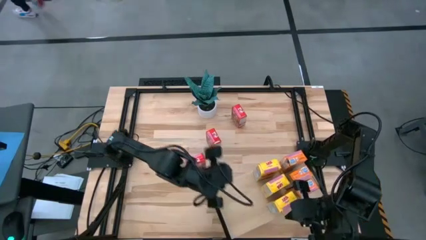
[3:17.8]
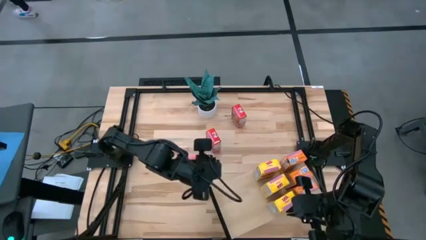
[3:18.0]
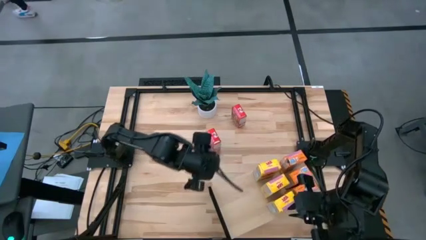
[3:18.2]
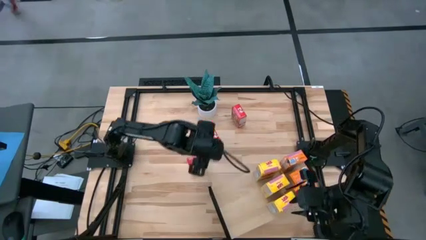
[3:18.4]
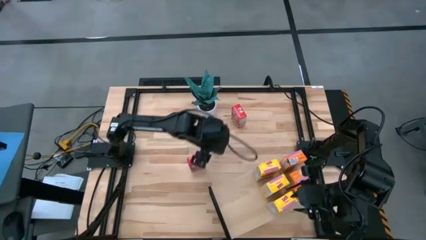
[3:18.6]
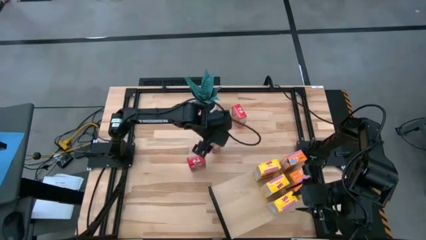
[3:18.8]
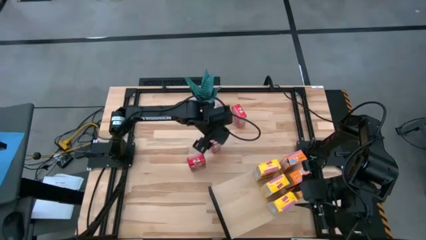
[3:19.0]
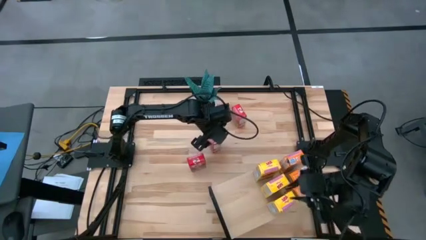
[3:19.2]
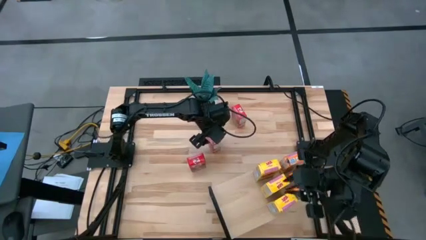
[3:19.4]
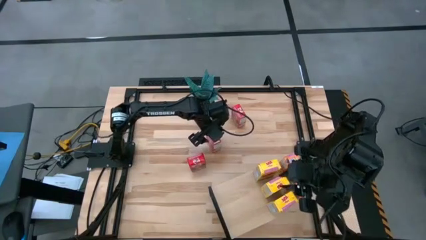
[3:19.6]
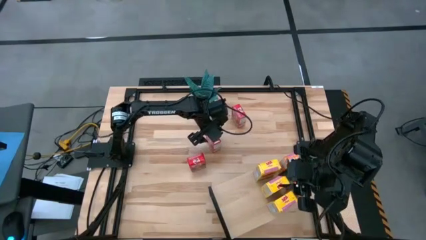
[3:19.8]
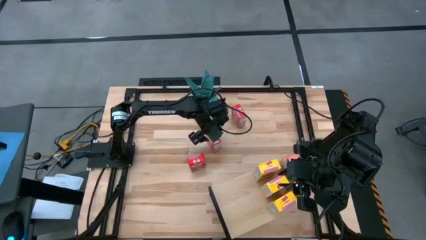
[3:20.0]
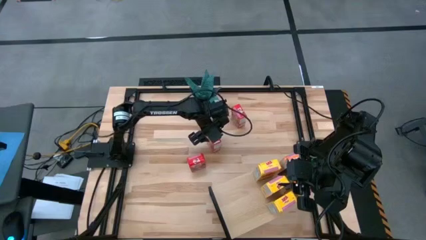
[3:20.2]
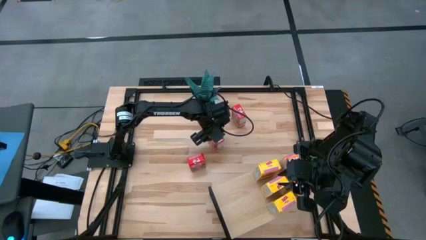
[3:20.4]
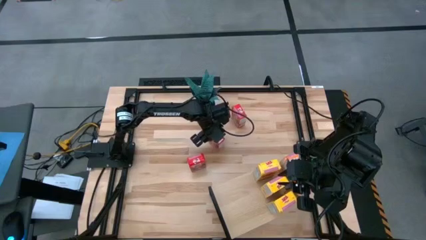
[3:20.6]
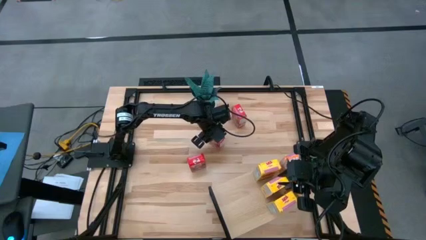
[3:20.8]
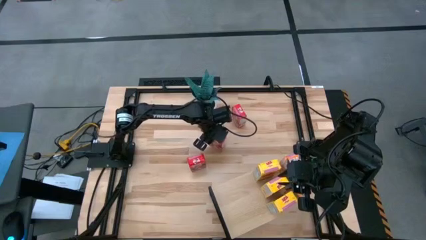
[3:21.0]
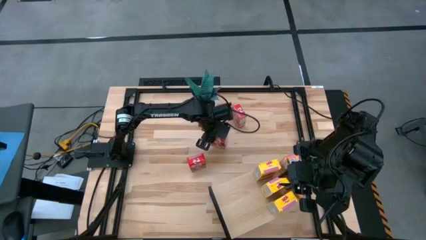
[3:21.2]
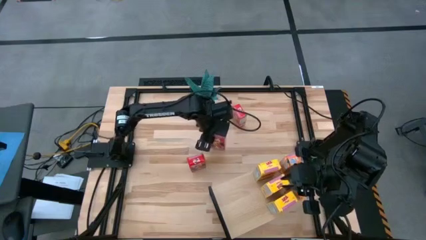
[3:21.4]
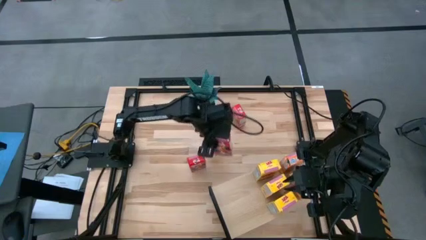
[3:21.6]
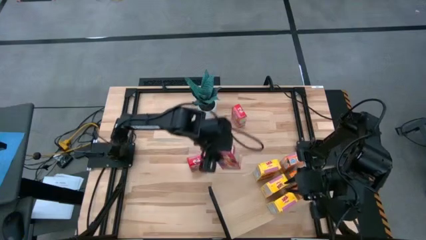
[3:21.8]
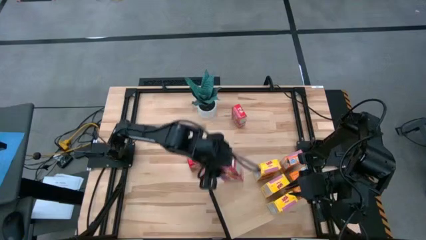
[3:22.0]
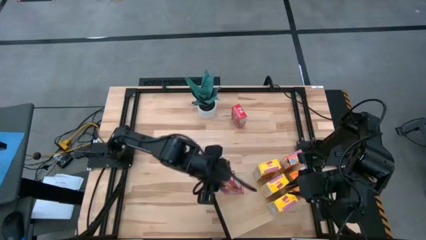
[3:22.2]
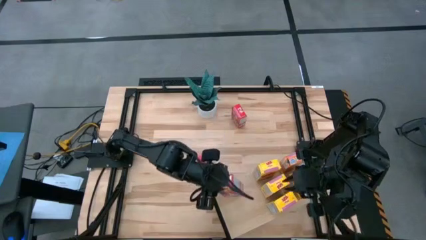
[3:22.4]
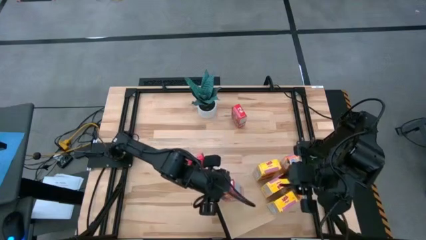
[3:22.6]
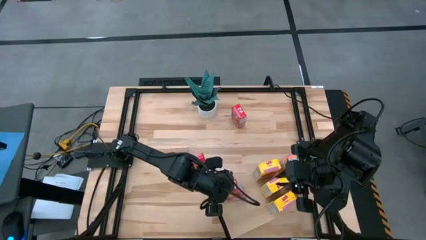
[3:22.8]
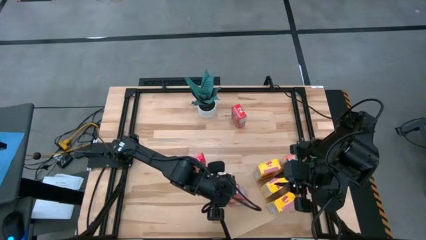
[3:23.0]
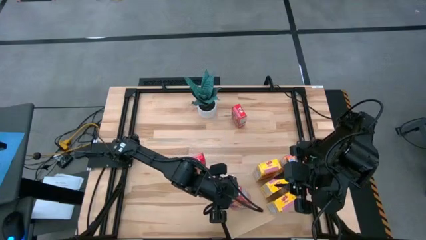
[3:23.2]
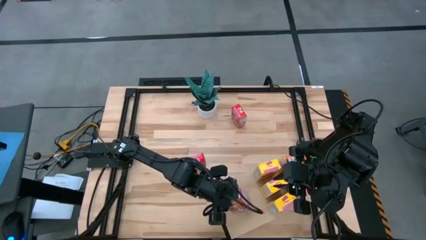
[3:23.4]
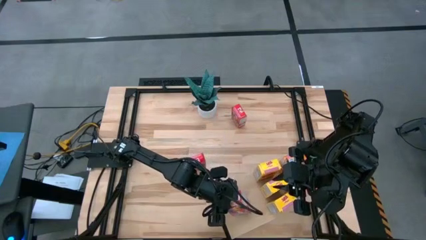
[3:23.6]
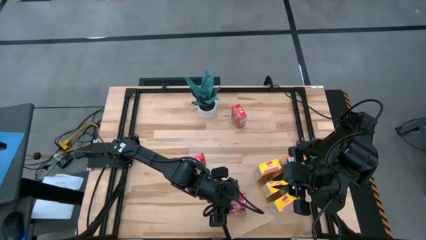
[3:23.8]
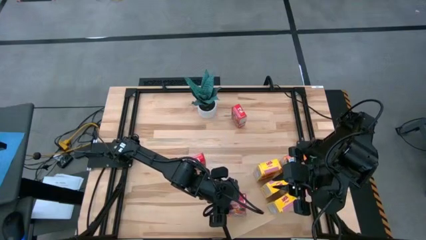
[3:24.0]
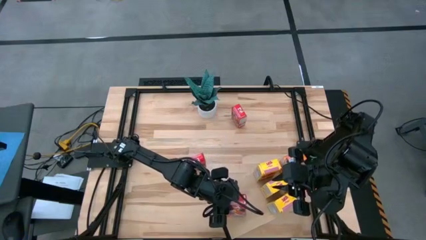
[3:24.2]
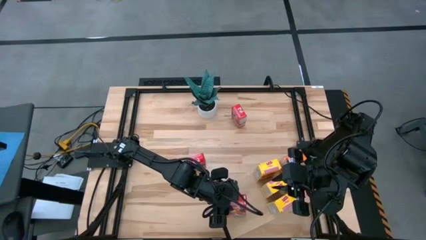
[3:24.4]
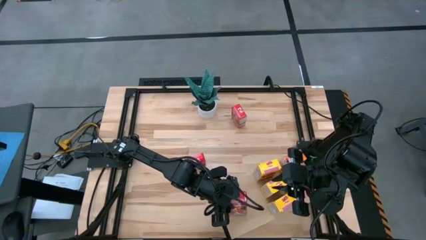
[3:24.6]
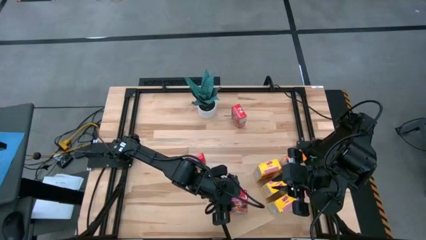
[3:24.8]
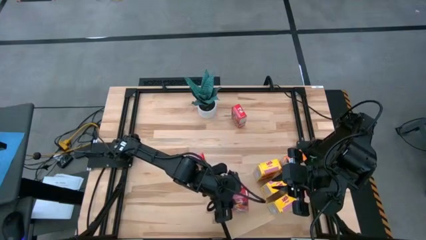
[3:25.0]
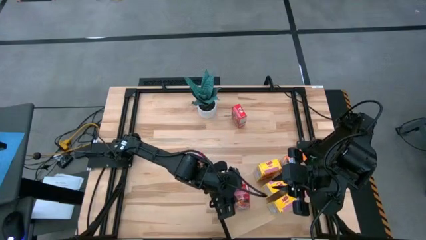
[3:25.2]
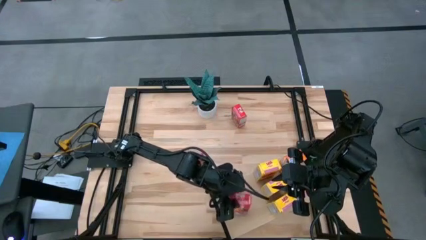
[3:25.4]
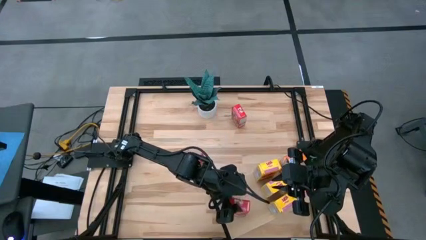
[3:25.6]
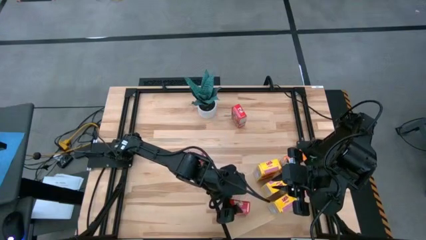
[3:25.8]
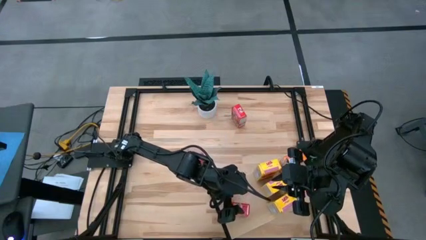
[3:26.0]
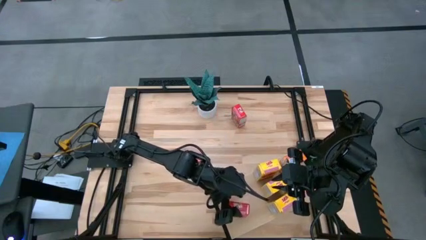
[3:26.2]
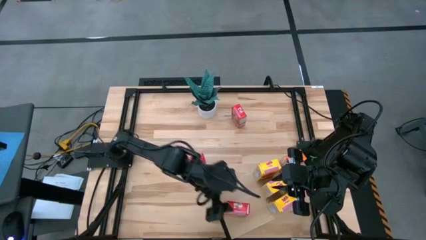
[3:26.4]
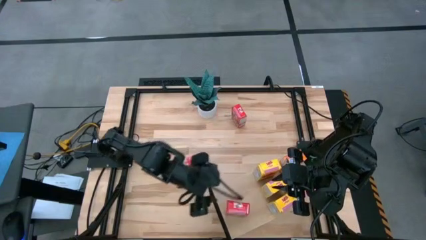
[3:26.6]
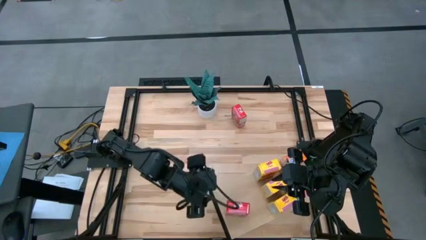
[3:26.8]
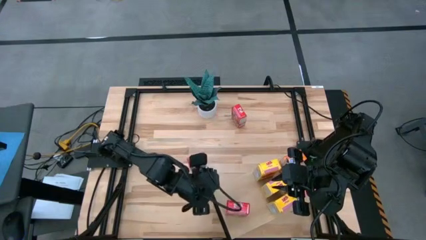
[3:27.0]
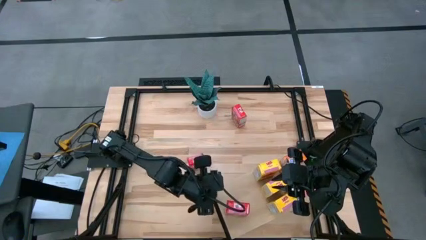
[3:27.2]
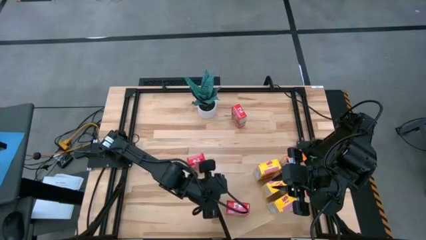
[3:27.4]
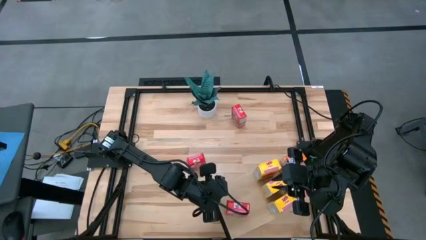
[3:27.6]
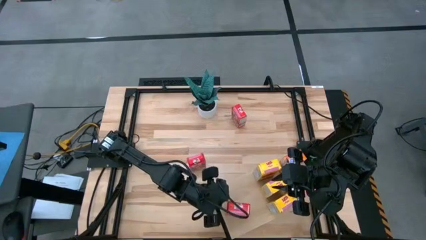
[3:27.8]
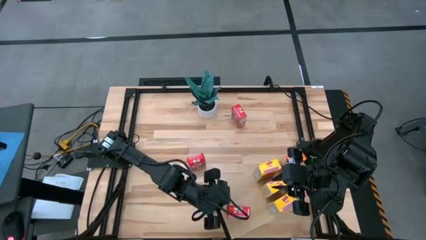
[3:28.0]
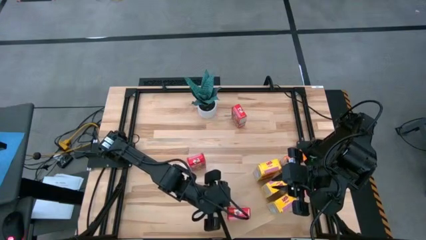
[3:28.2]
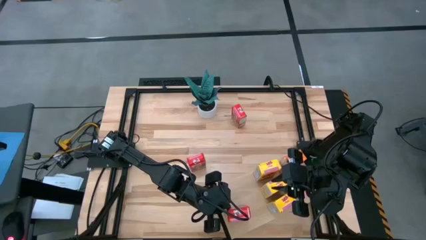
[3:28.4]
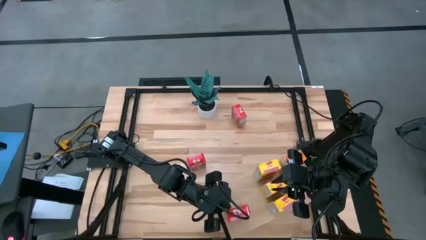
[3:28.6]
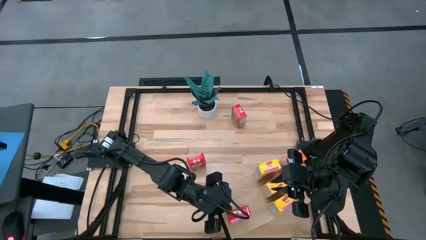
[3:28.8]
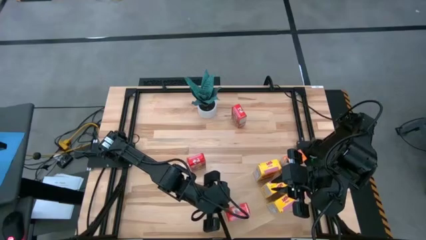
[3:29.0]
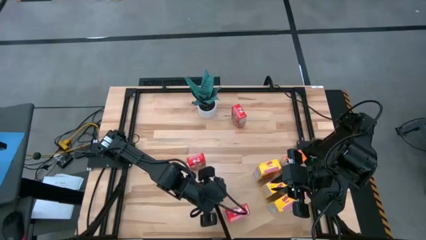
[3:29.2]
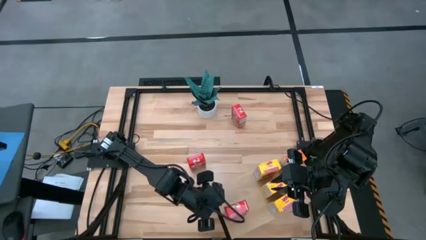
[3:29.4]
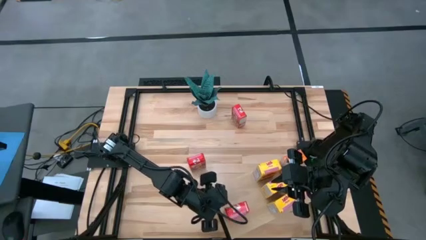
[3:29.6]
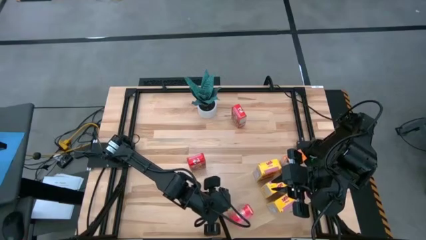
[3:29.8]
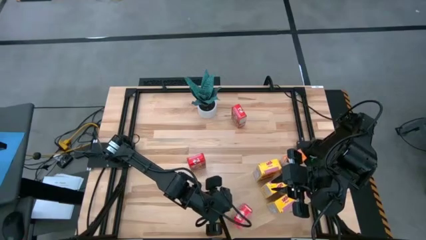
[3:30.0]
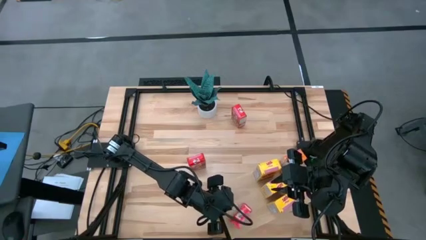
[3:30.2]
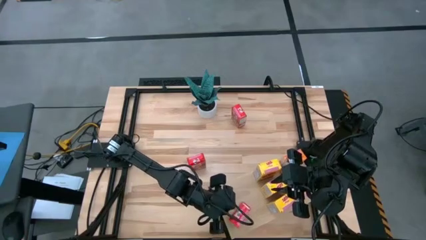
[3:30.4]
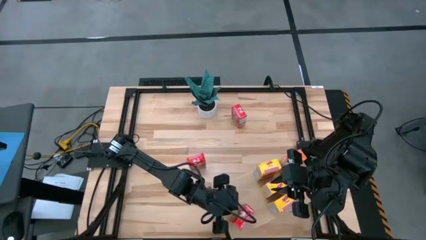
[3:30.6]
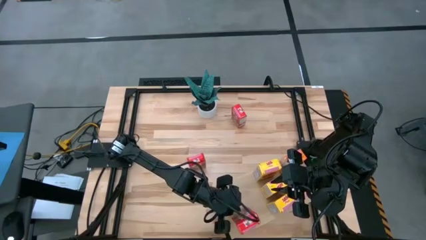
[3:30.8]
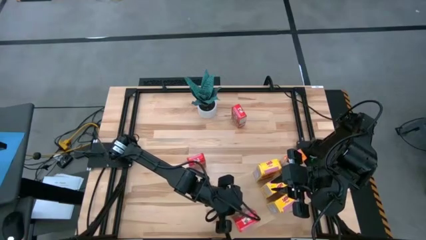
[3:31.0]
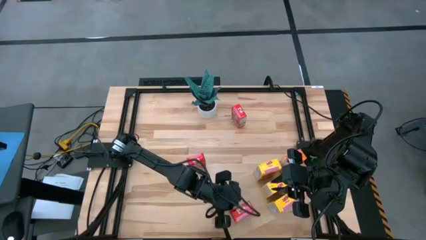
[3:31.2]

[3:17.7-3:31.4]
Task: Stack cereal on shelf
Put the middle red cereal box on the shelf
